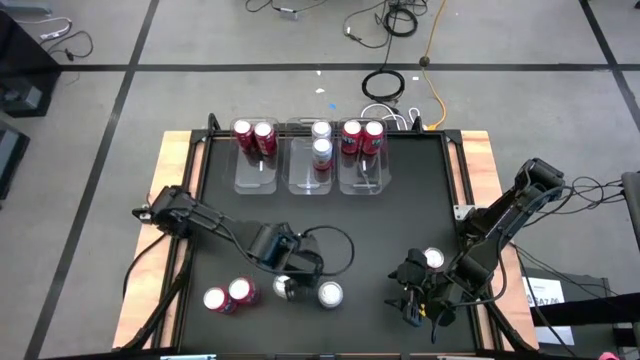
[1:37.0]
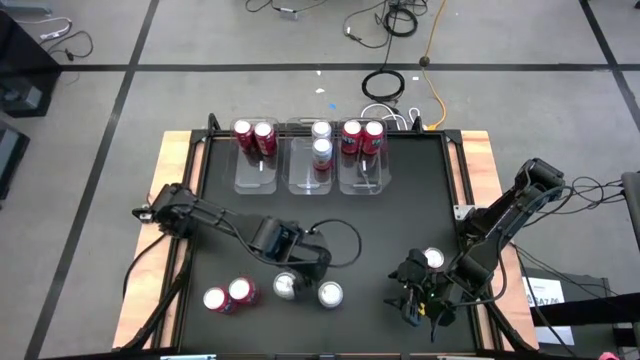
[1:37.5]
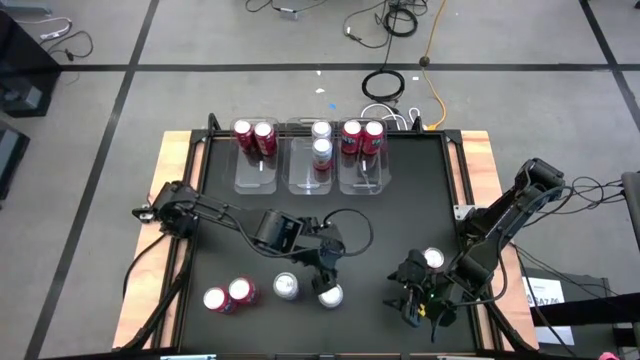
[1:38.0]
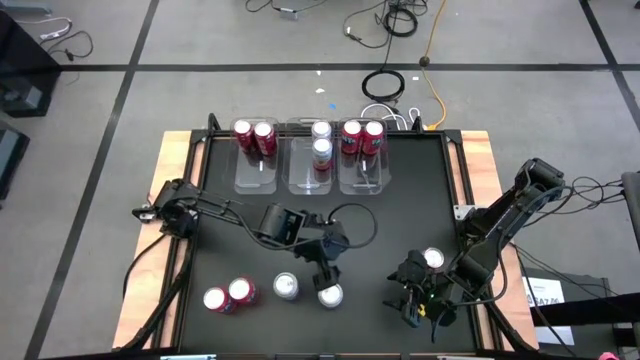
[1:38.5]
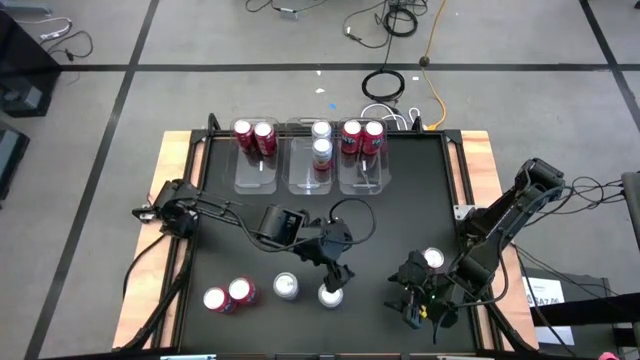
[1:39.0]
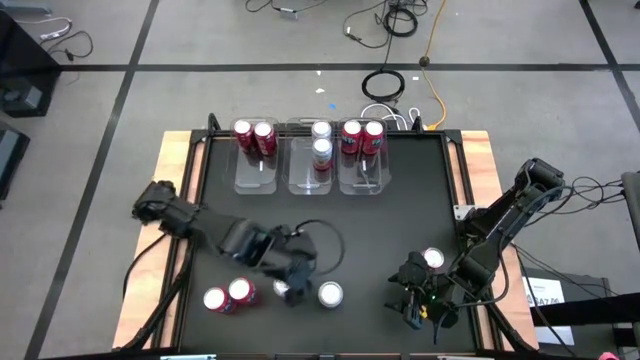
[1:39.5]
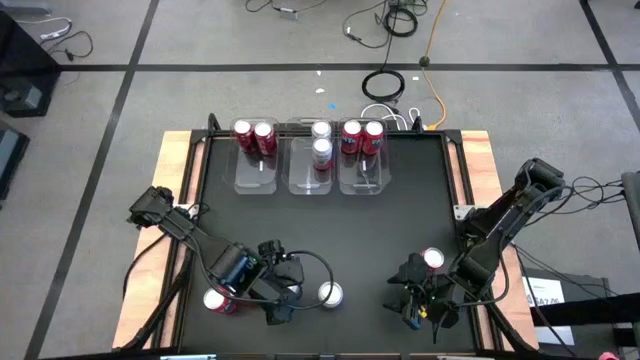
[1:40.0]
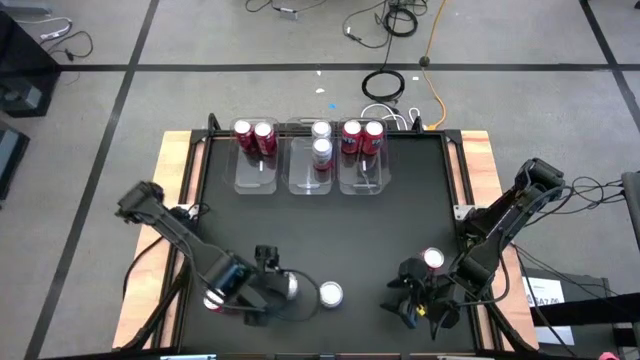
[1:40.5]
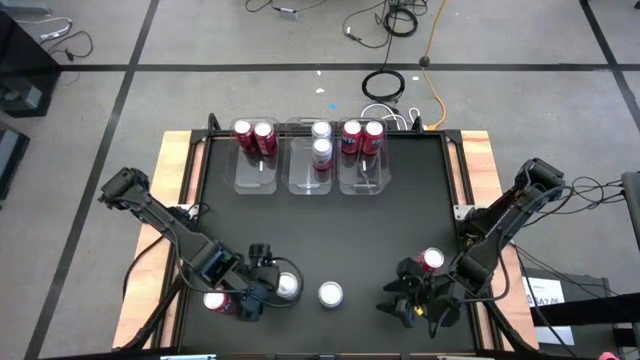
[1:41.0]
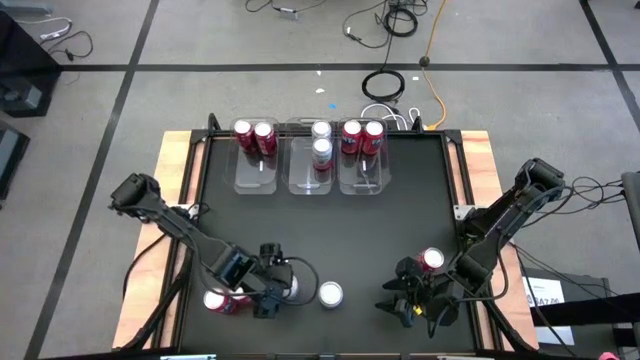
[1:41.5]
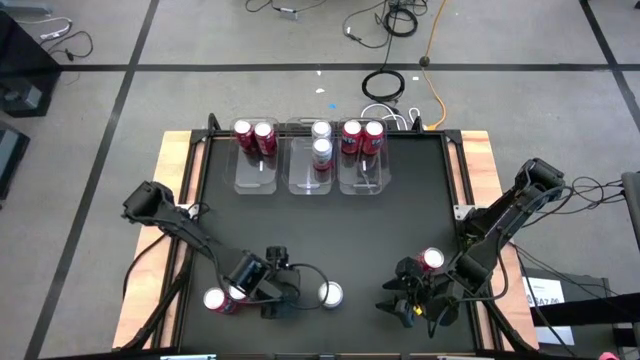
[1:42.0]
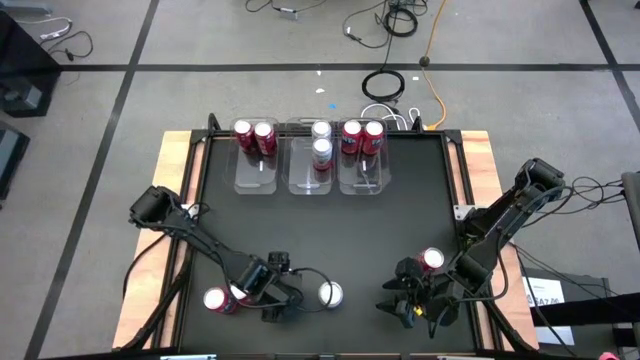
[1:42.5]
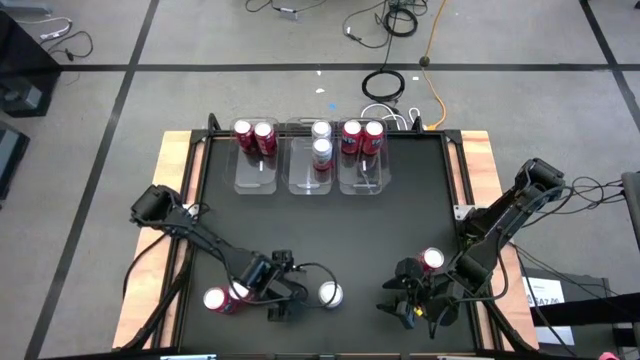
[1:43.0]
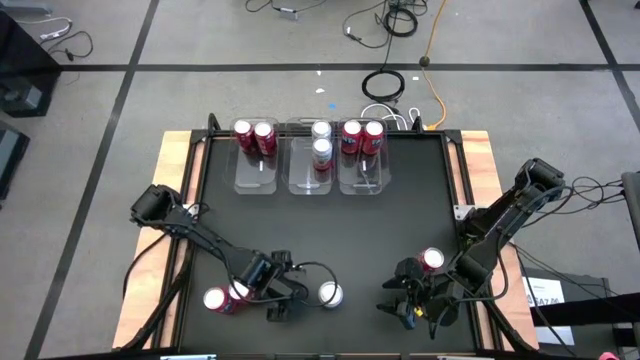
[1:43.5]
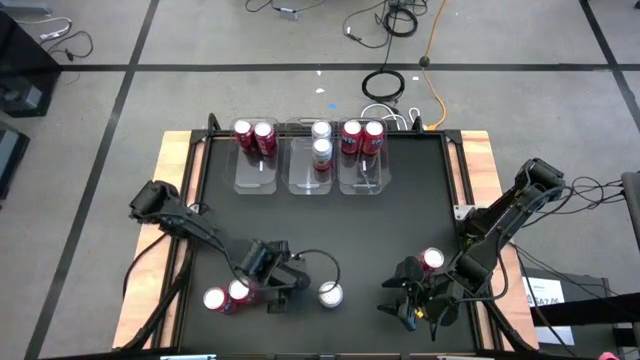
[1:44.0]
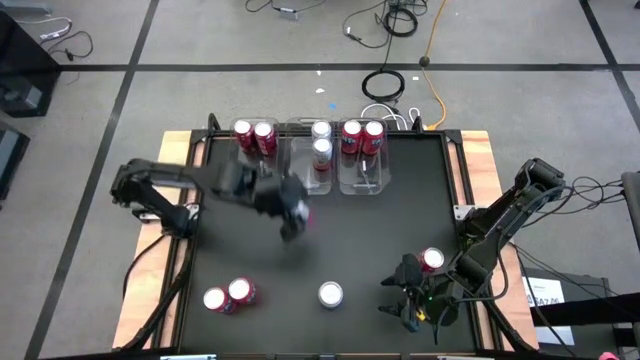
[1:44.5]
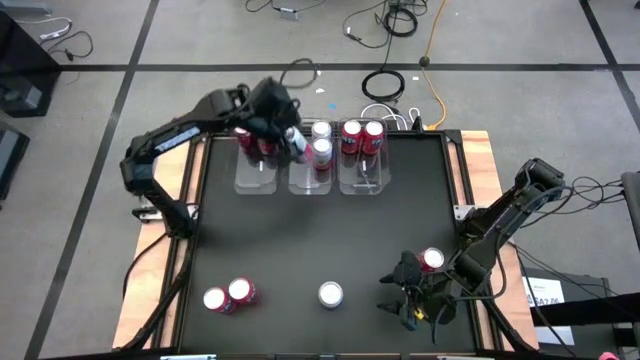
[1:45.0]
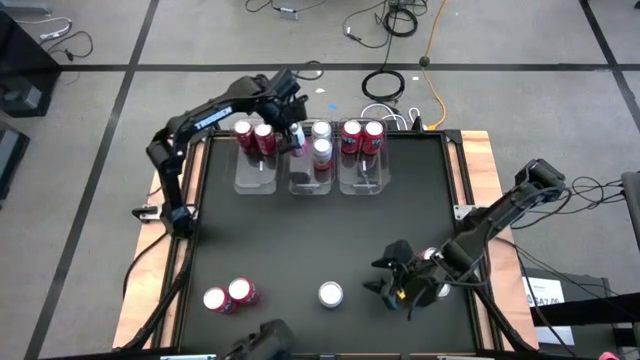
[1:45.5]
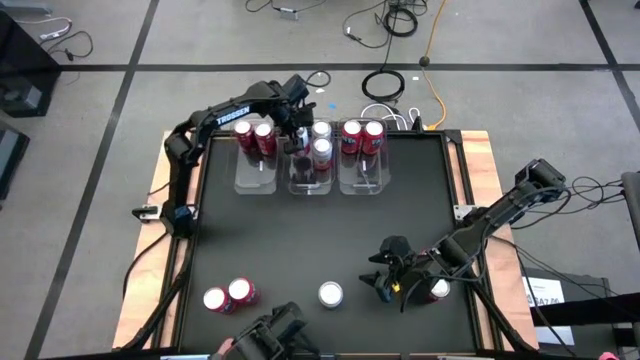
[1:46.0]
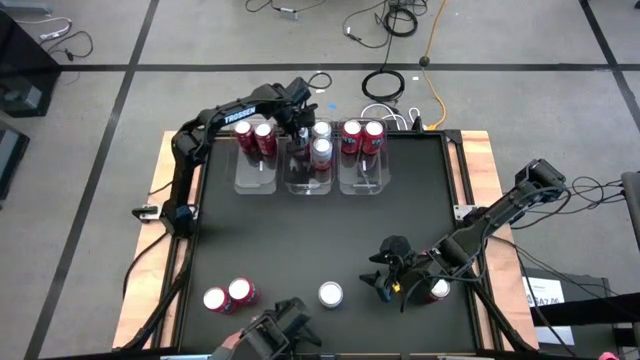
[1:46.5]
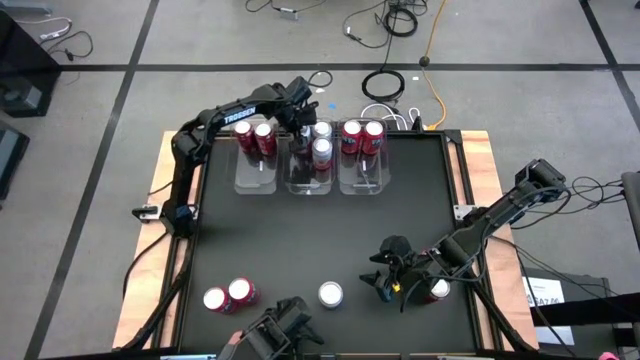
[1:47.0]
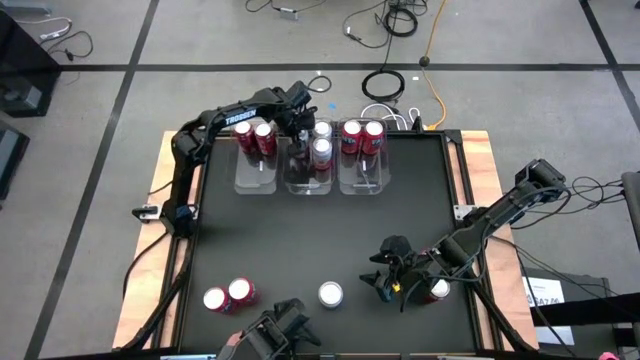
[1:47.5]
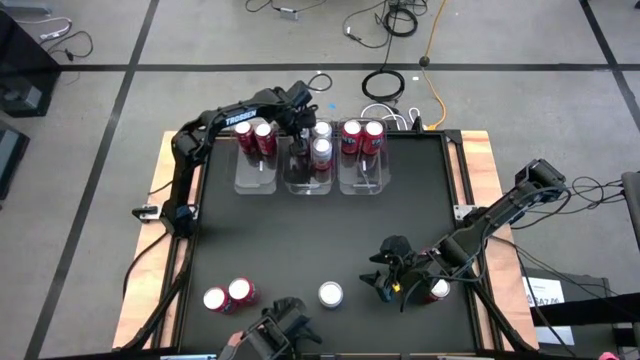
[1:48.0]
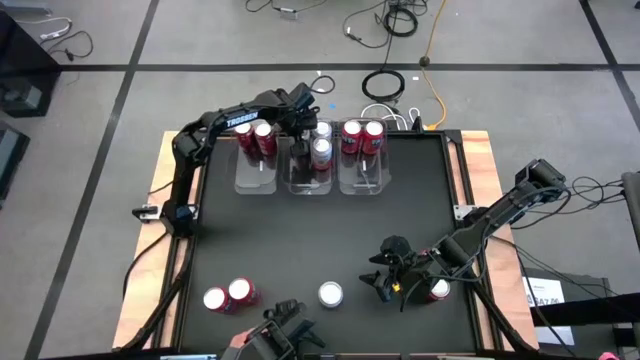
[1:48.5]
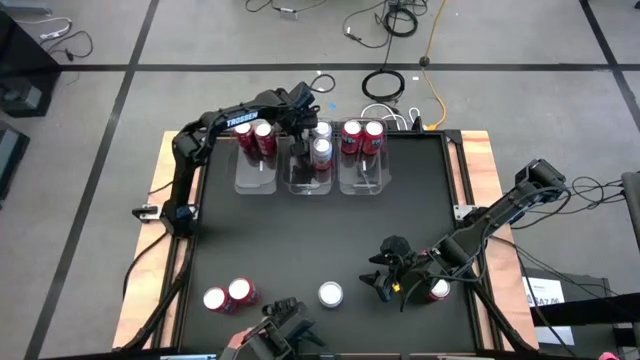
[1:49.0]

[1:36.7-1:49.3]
Task: Sort soda cans
Put the pink soda can into the middle transparent bin

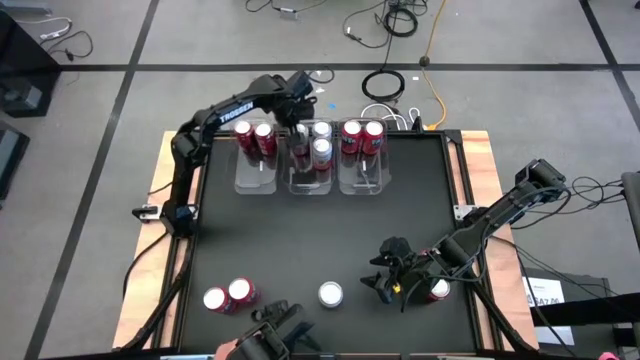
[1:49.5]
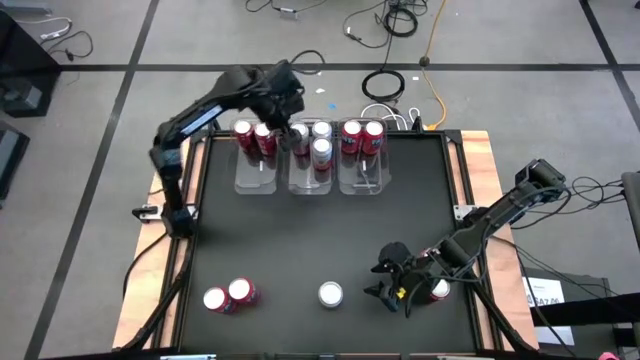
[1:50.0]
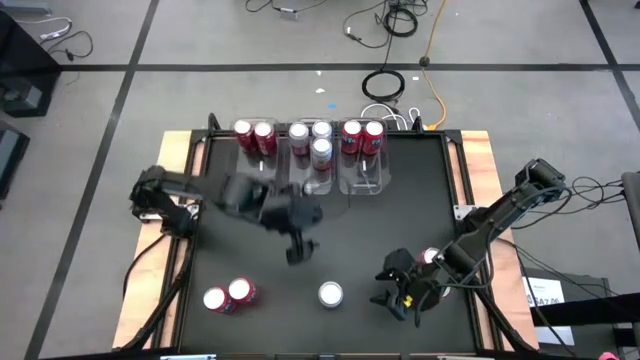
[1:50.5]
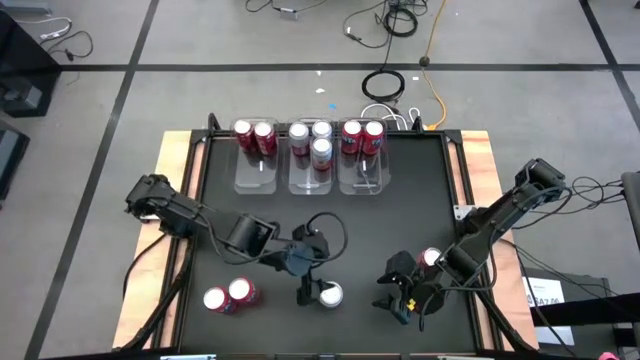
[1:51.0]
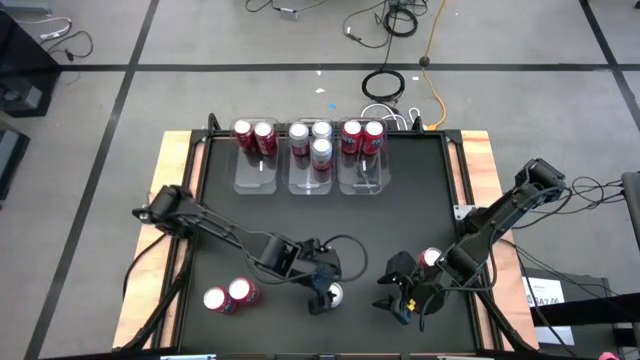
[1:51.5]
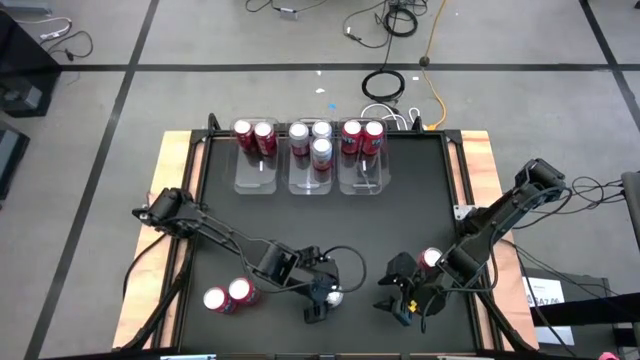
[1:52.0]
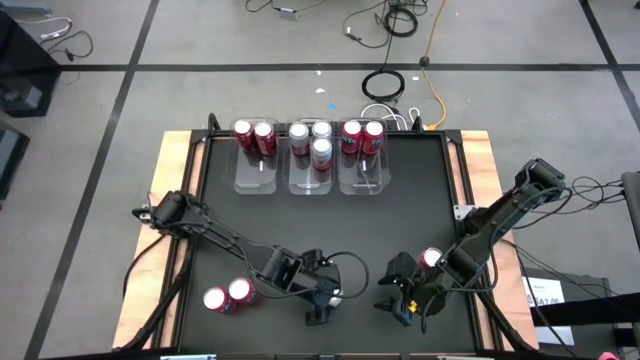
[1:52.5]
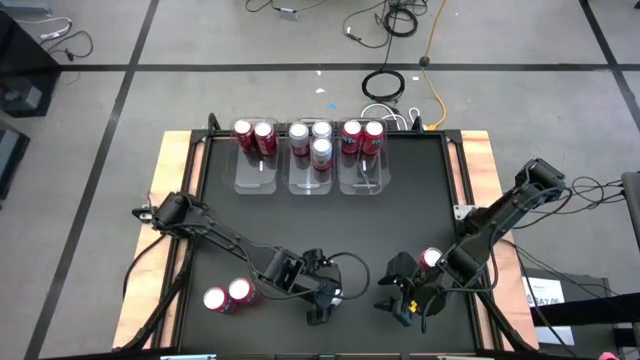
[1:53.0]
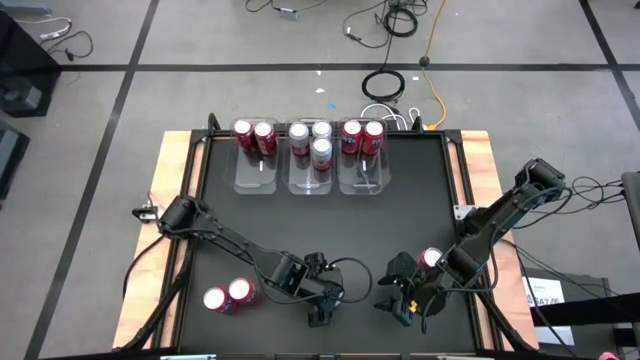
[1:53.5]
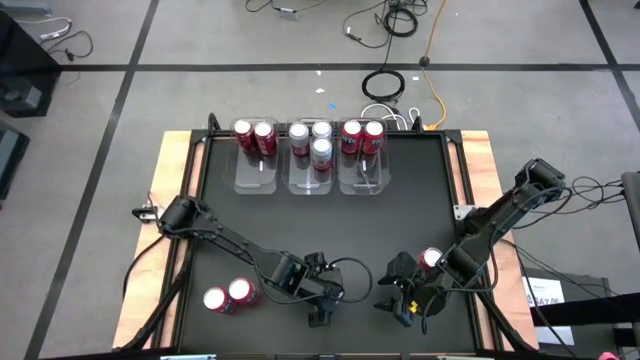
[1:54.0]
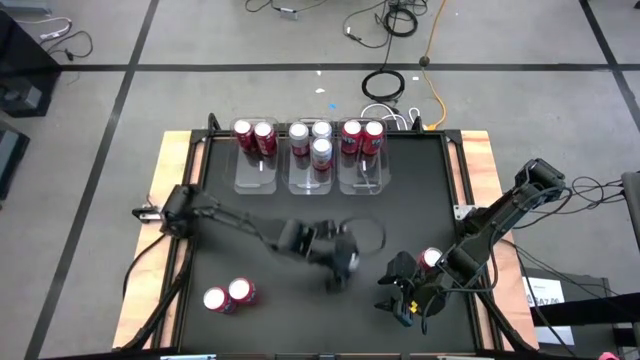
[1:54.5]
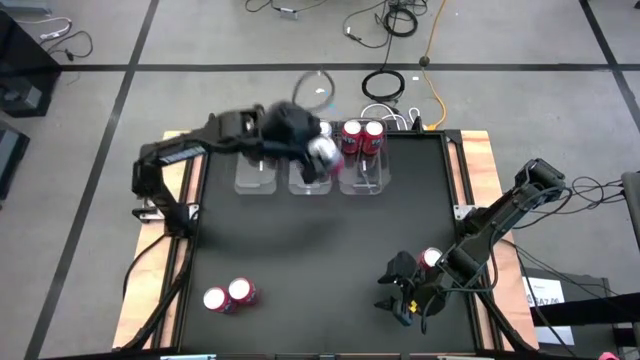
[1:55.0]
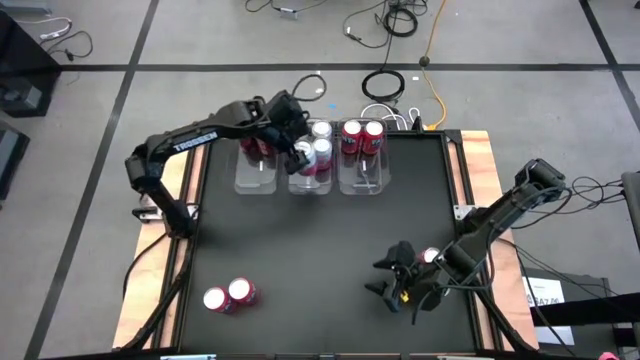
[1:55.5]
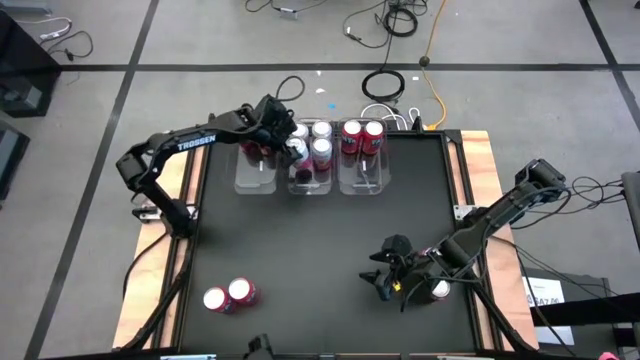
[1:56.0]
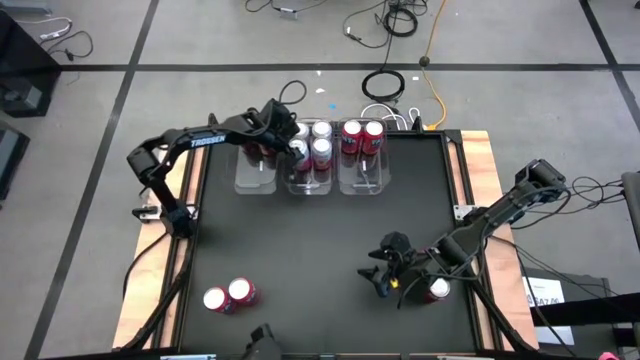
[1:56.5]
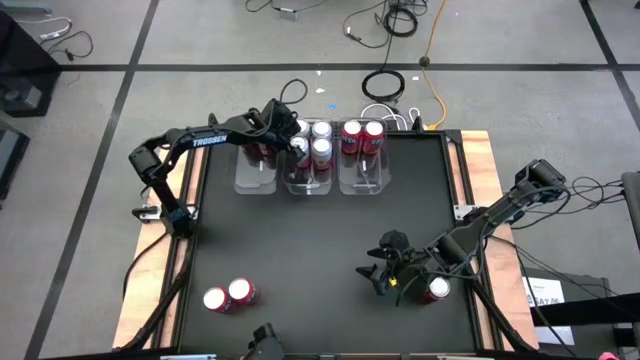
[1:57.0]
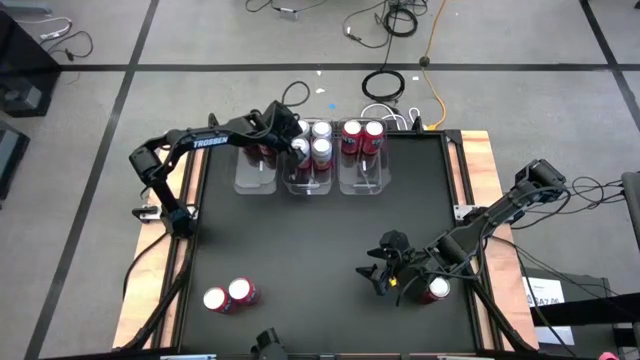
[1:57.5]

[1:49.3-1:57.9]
Put the pink soda can into the center transparent bin
